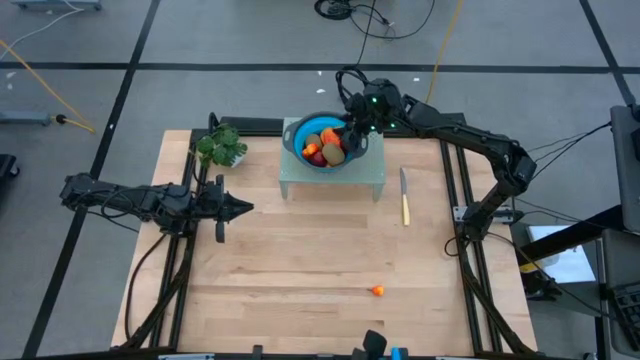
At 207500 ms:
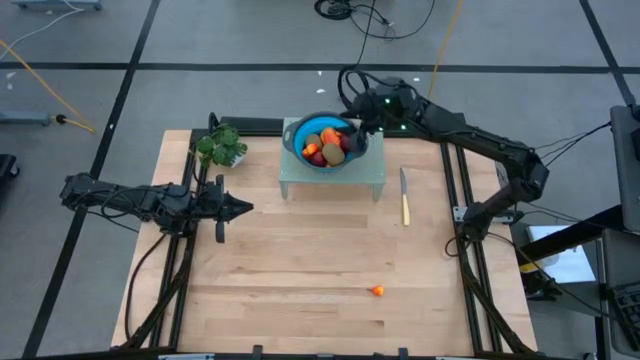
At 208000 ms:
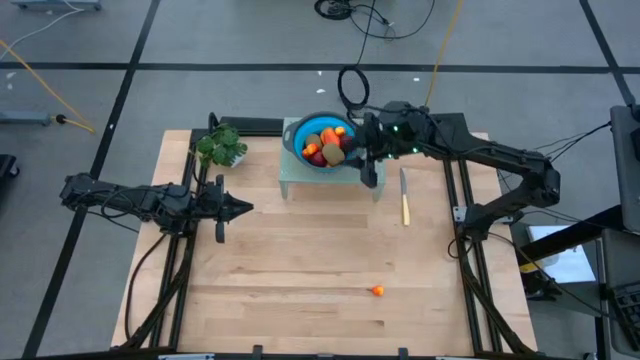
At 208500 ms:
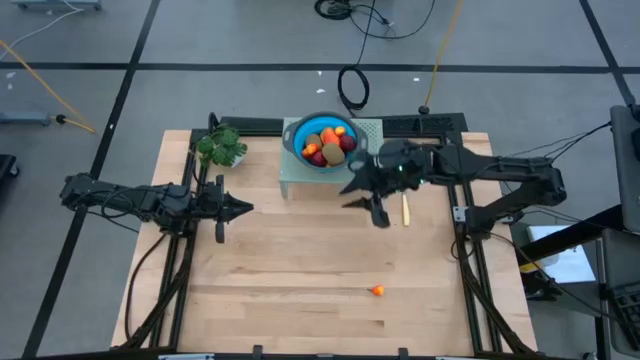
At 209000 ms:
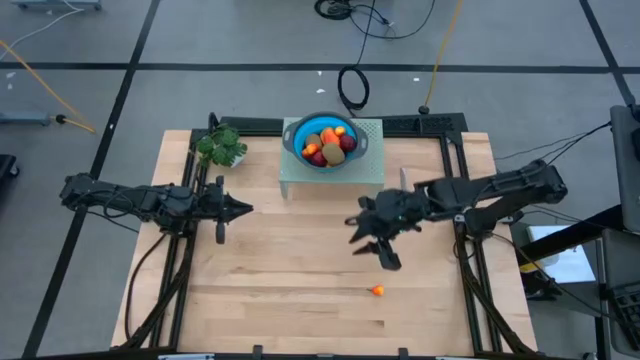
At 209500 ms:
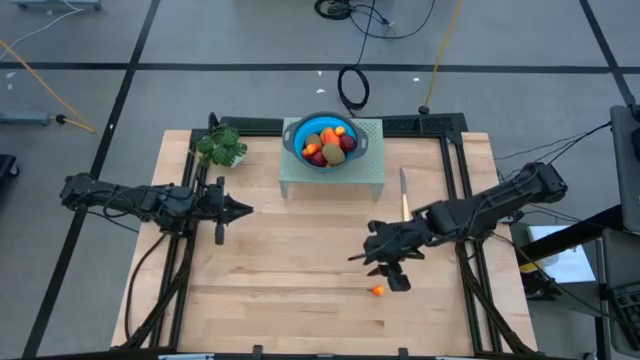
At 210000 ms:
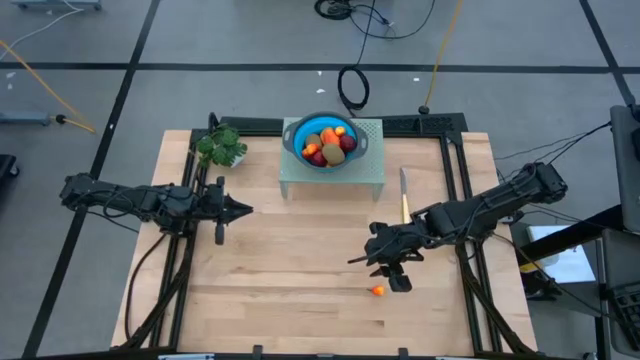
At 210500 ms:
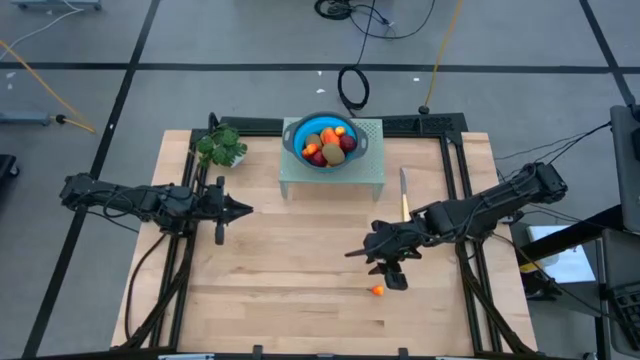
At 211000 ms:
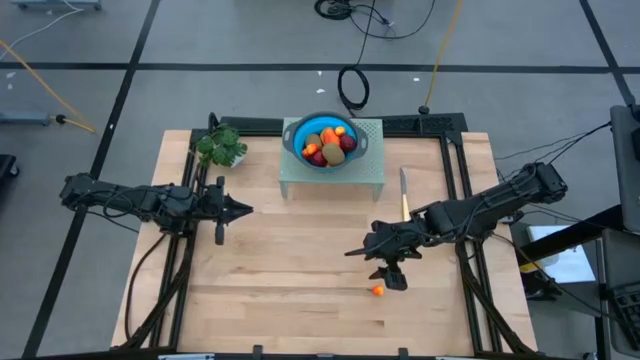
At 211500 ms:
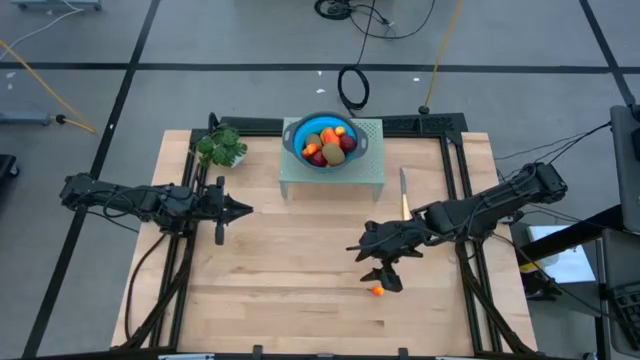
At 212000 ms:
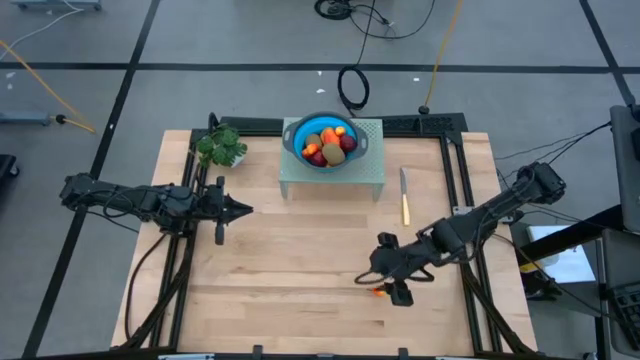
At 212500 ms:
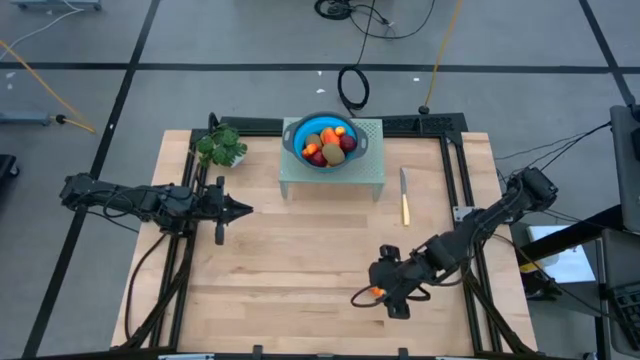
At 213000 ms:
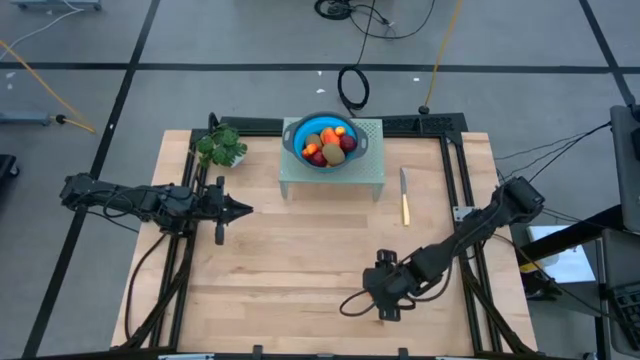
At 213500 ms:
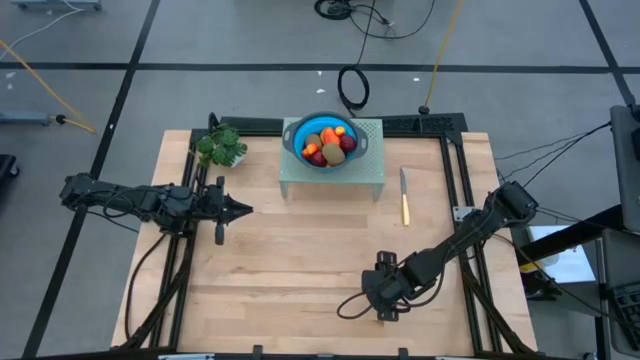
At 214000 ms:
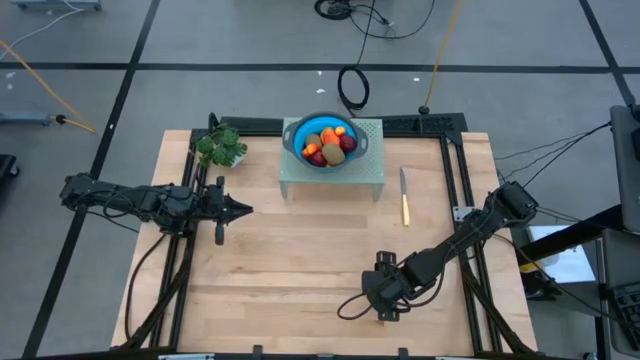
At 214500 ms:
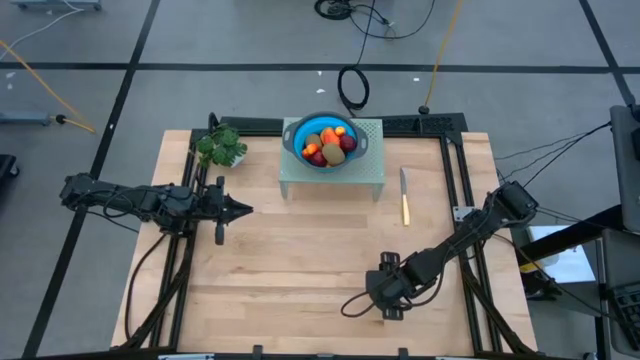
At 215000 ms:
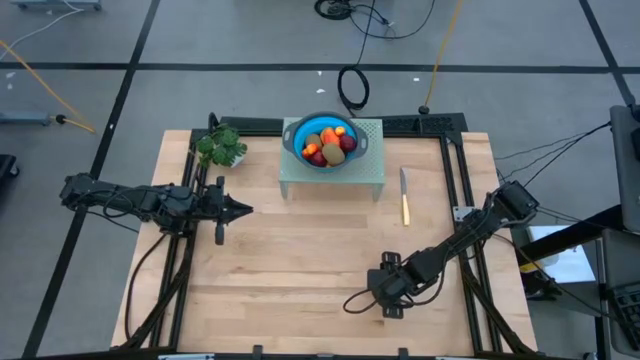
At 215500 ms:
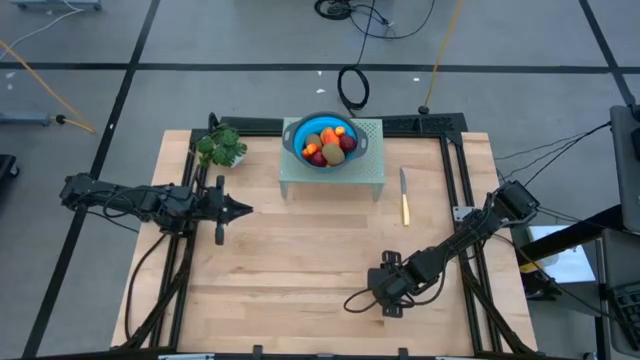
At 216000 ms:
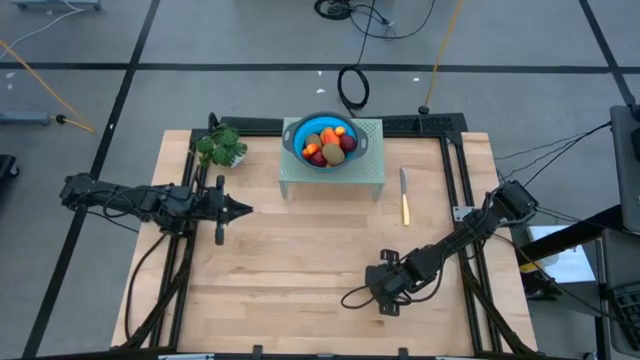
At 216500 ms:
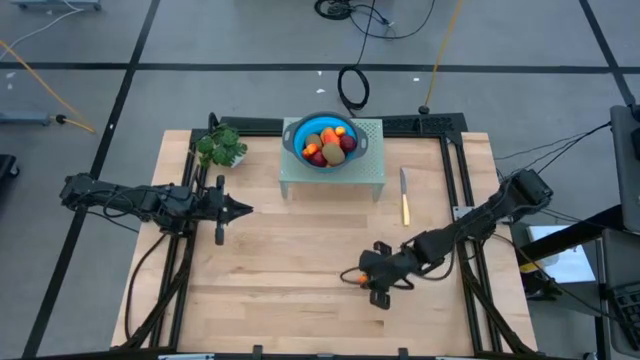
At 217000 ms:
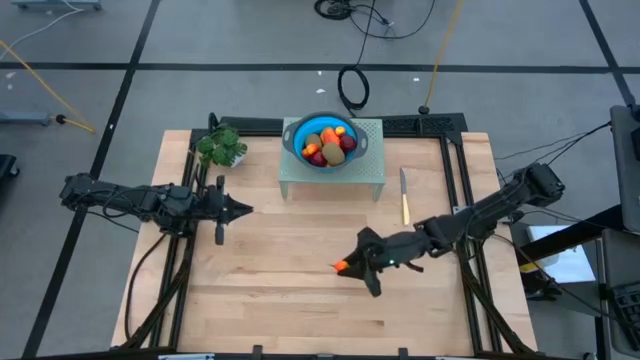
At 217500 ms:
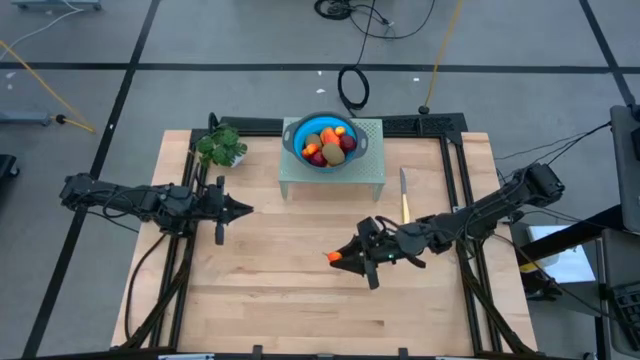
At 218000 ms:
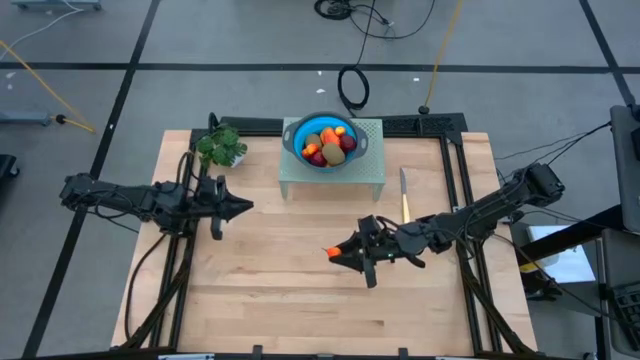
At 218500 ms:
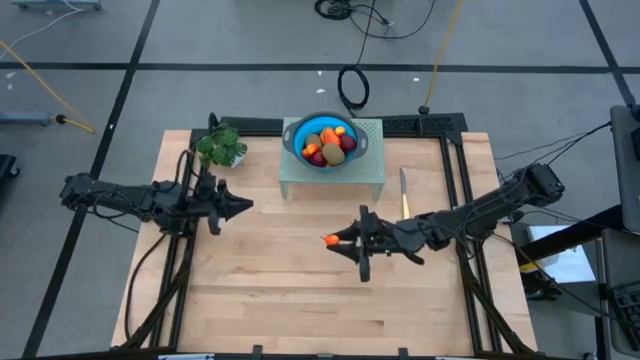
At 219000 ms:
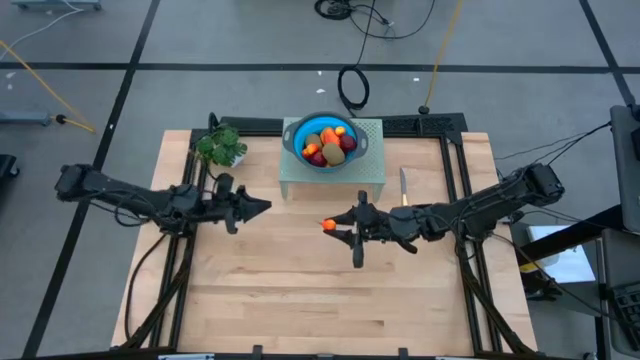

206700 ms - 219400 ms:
Task: Pick & Place Fruit
Put the peach into the colander on the shelf

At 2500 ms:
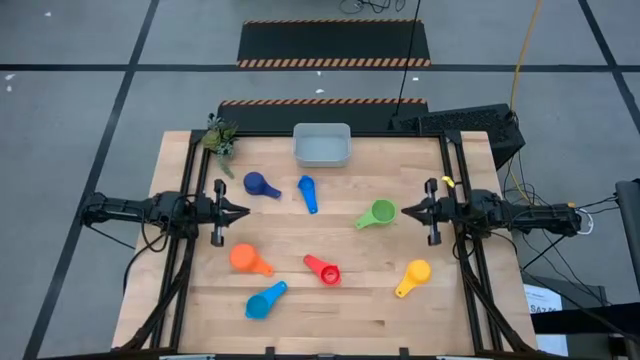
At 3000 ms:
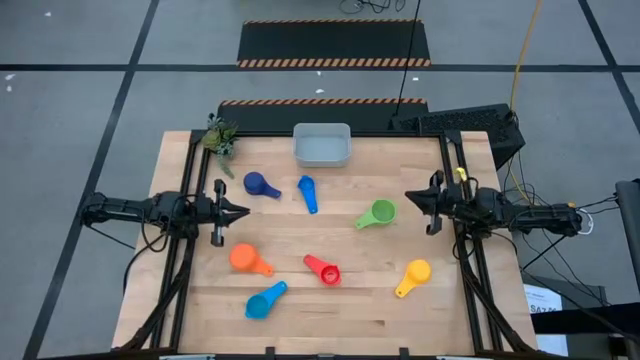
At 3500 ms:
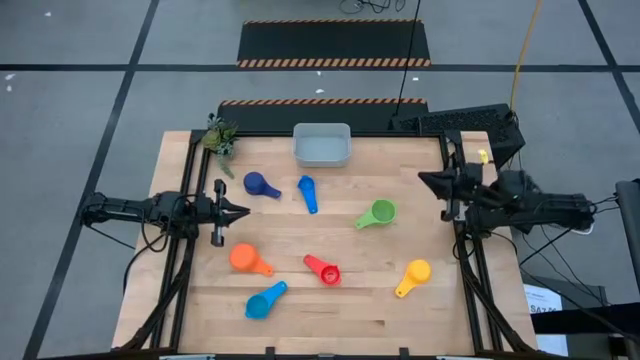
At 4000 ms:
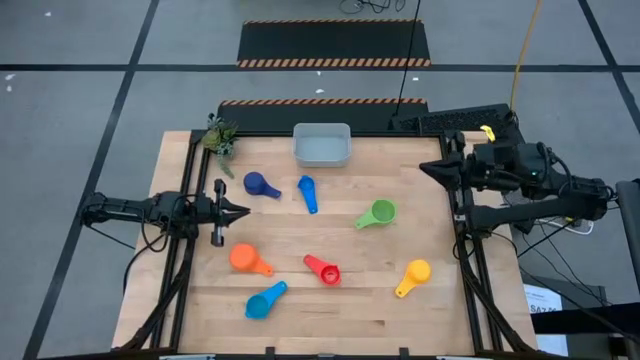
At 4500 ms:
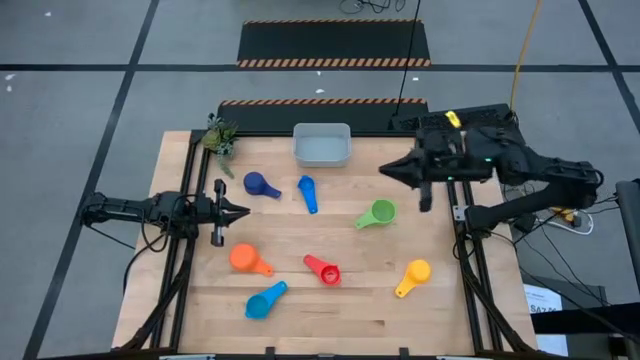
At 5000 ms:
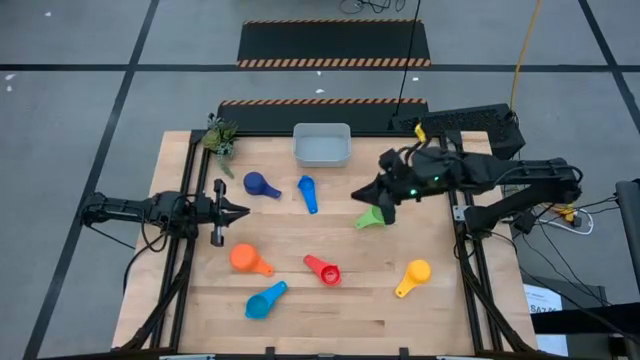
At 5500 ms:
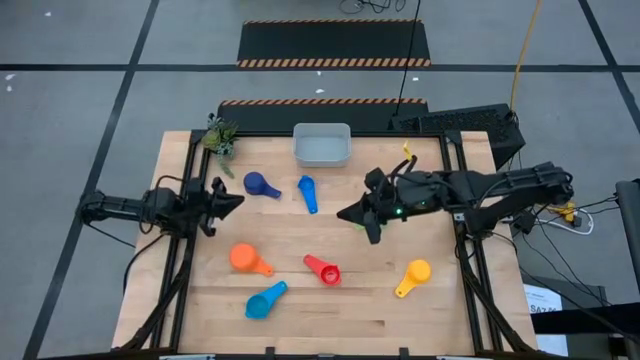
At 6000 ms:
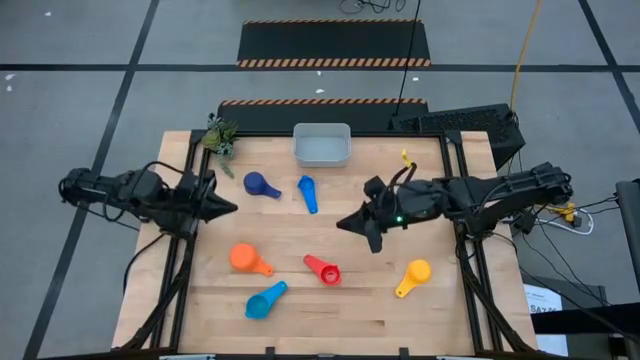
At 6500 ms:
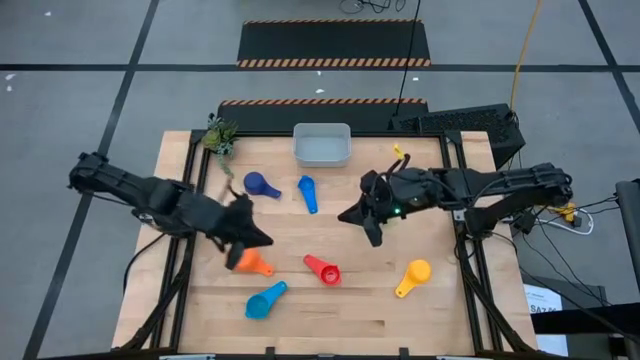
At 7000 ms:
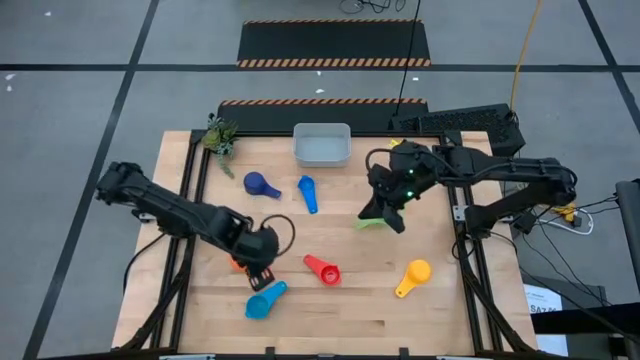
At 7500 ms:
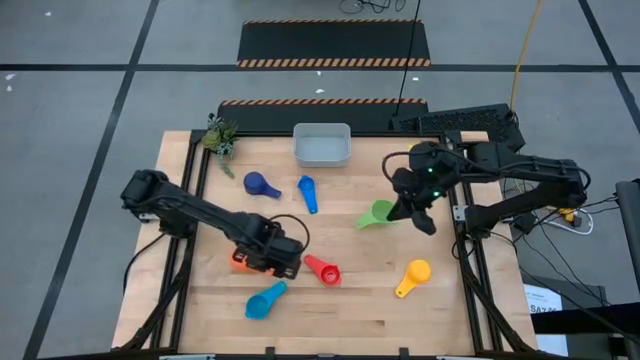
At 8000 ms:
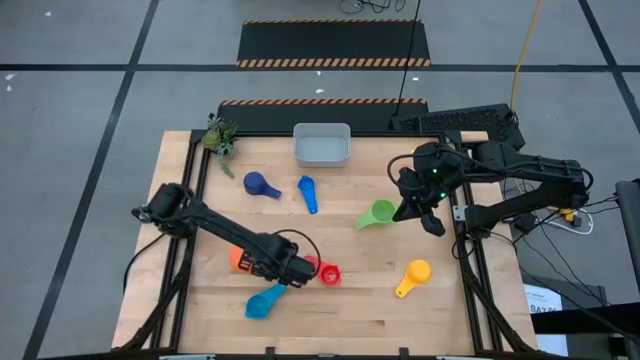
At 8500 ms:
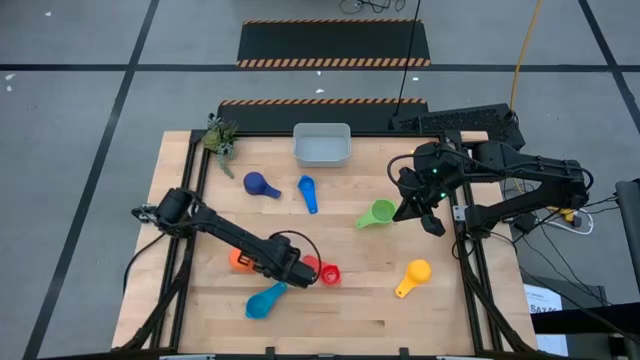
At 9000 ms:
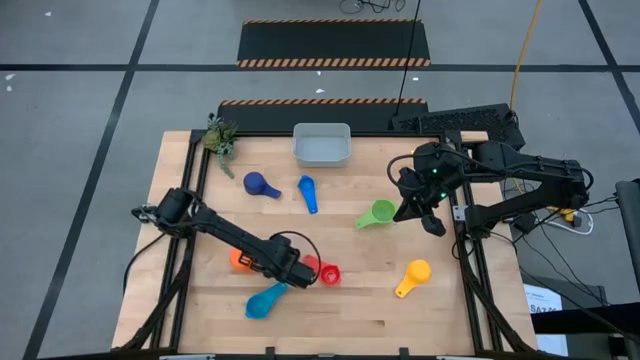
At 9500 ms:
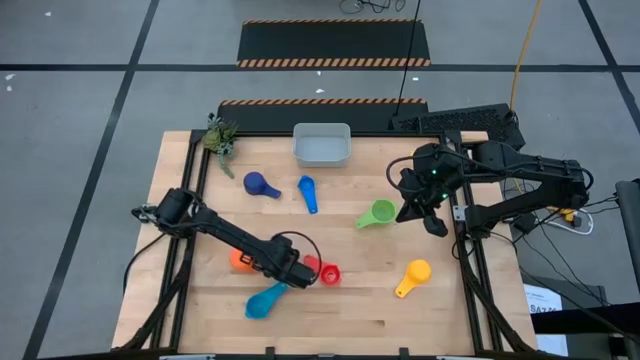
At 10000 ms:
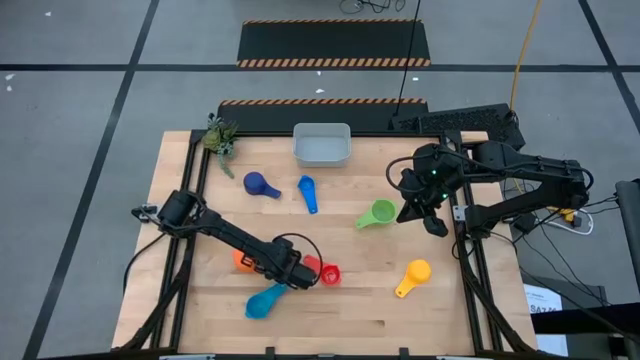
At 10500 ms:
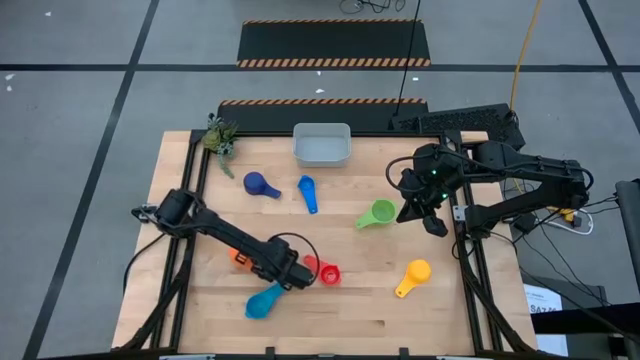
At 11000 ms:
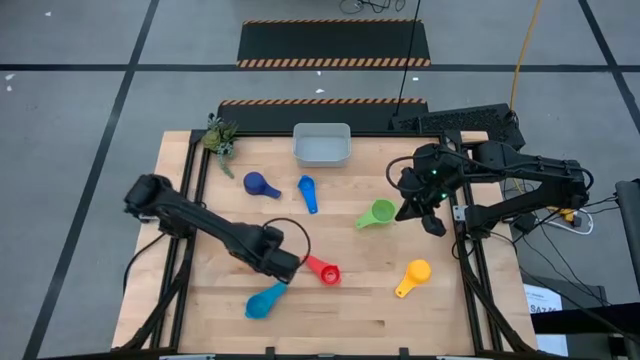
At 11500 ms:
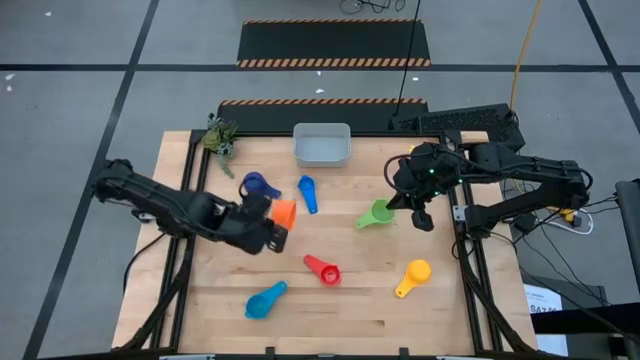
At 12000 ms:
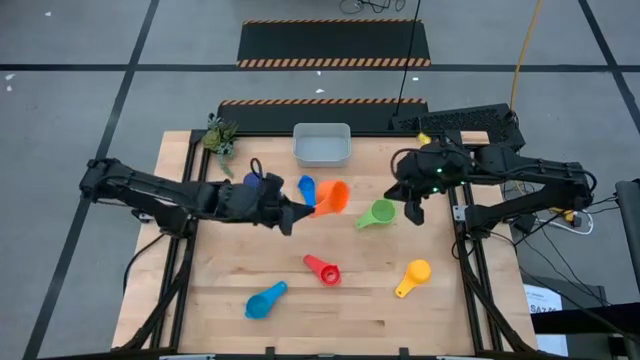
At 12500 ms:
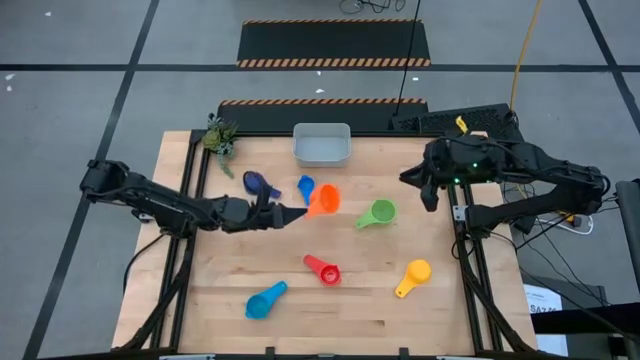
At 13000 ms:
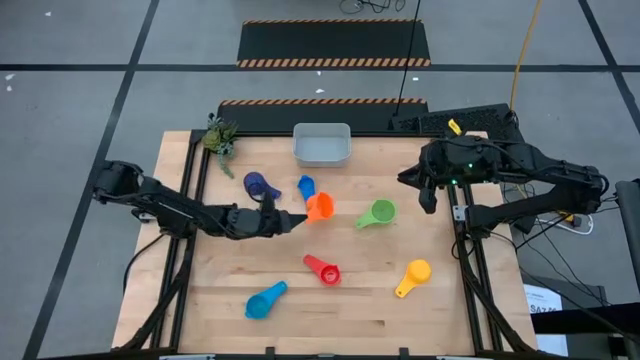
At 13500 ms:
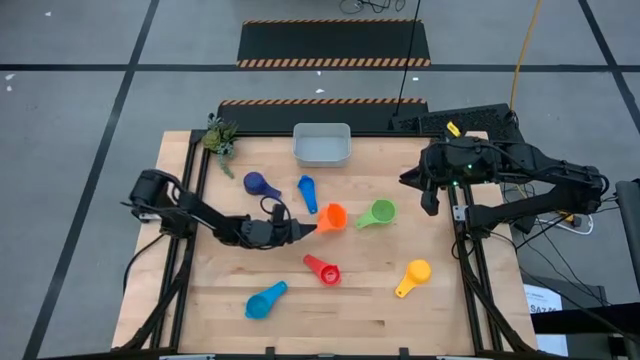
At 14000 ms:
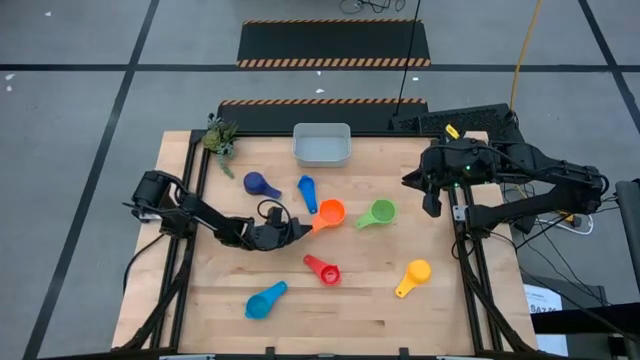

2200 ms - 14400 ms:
Task: Nest measuring cups in basket
Move the orange measuring cup to the center of the table
